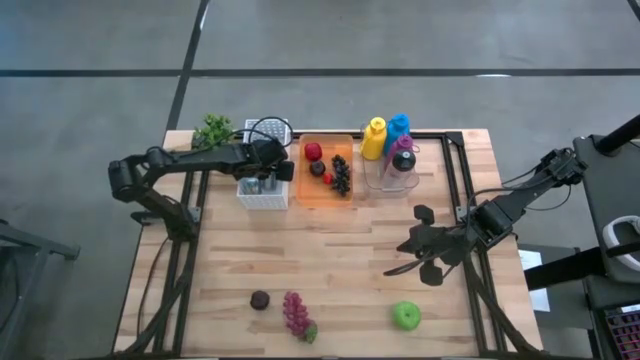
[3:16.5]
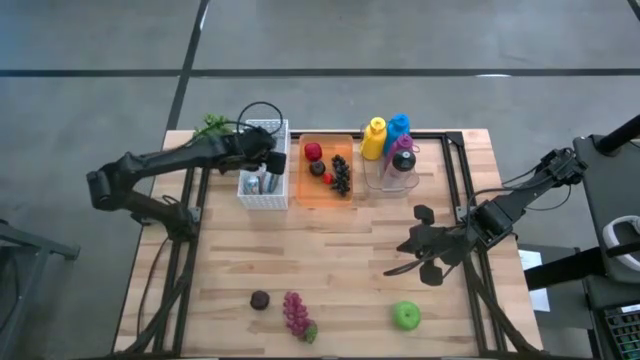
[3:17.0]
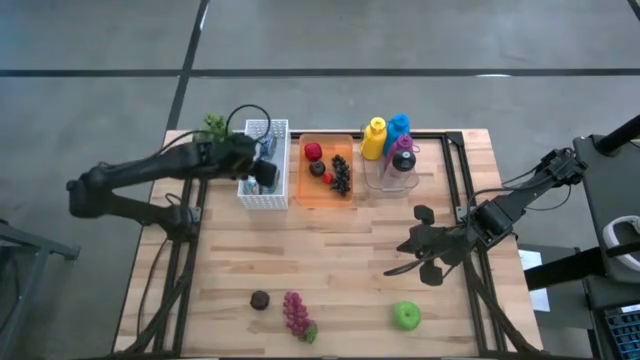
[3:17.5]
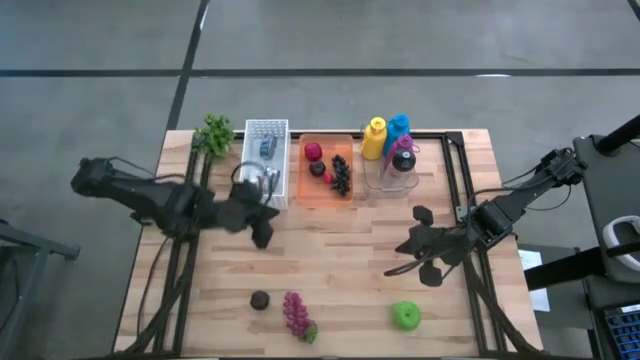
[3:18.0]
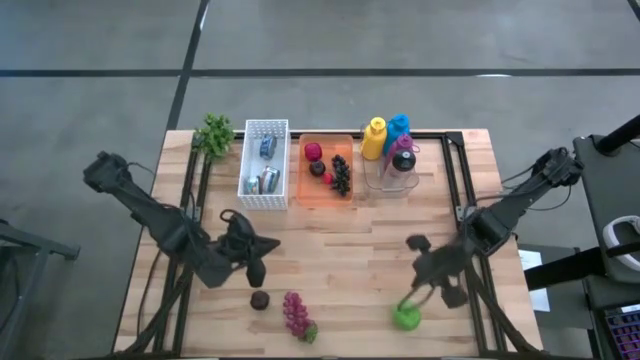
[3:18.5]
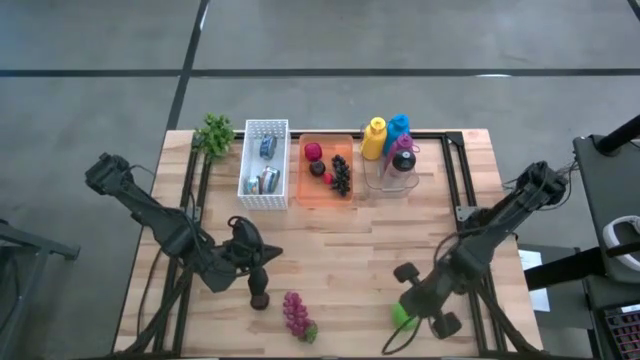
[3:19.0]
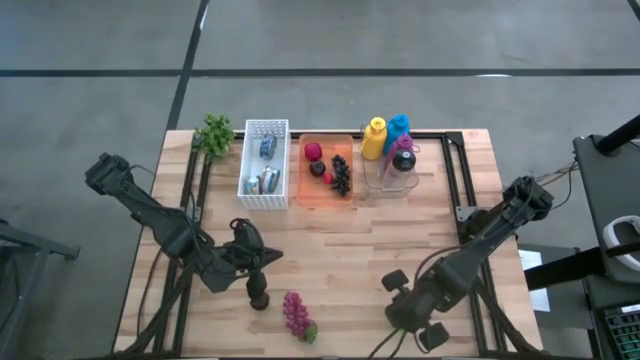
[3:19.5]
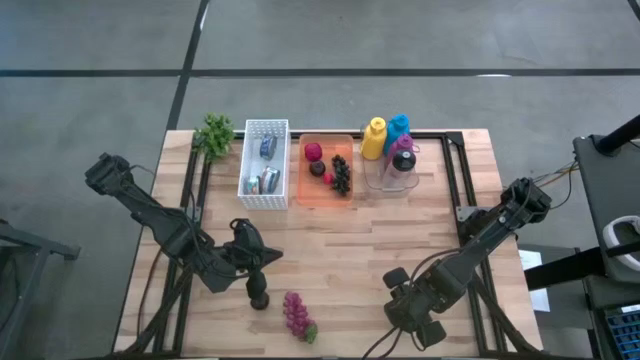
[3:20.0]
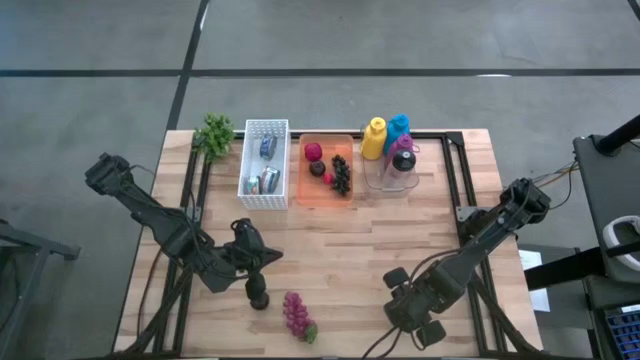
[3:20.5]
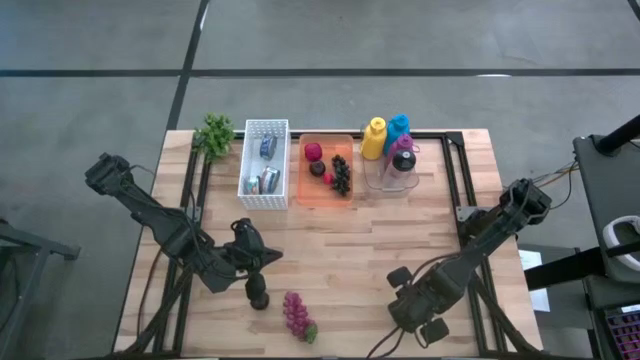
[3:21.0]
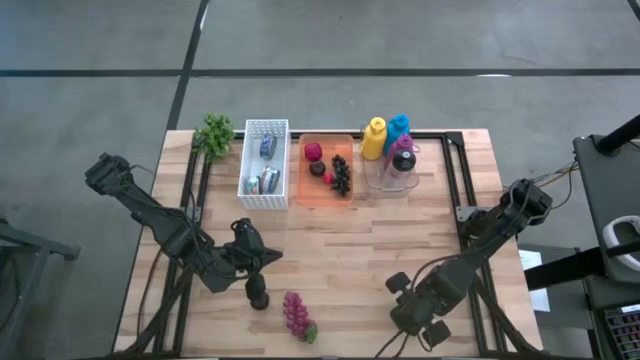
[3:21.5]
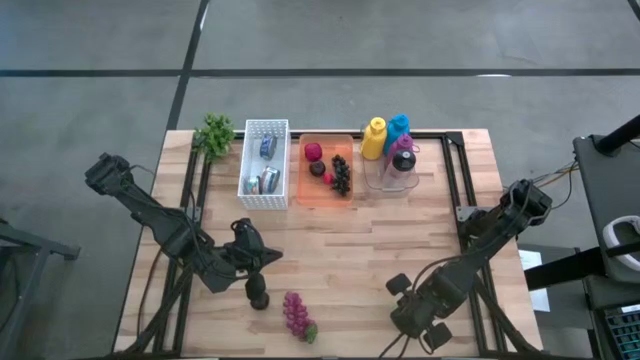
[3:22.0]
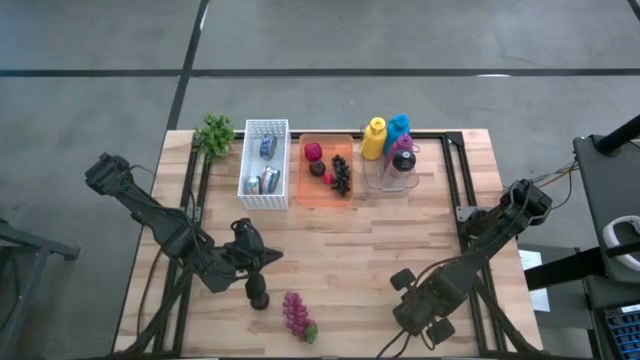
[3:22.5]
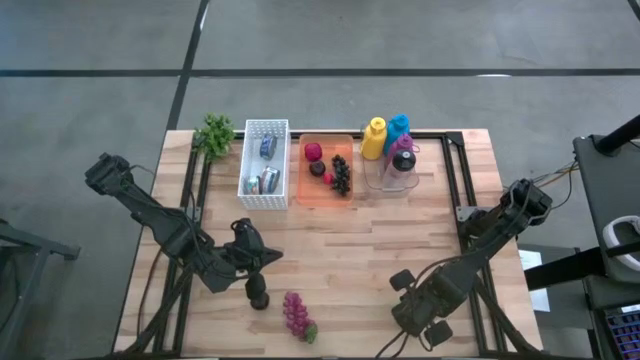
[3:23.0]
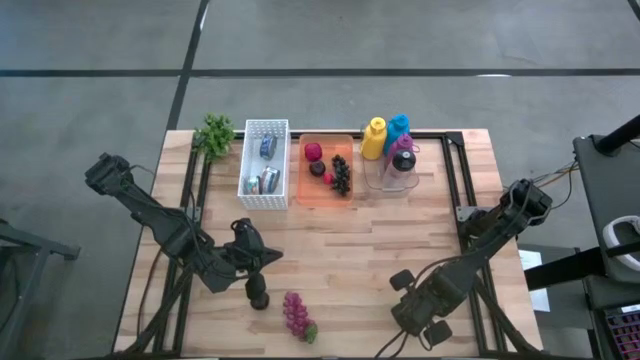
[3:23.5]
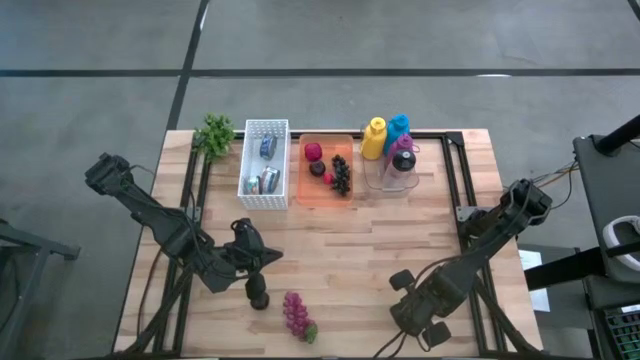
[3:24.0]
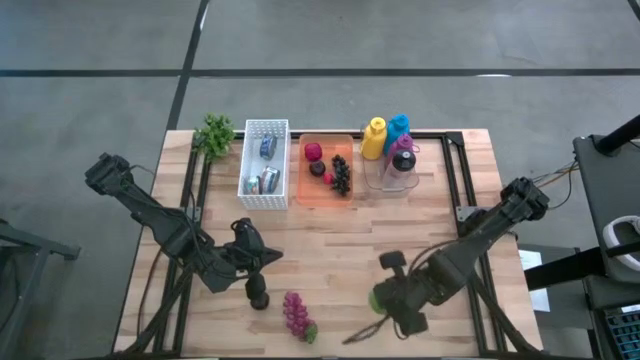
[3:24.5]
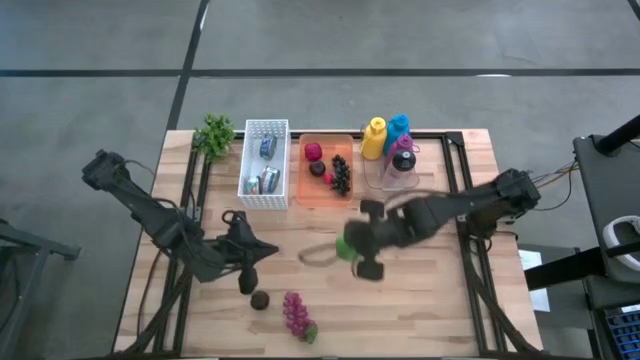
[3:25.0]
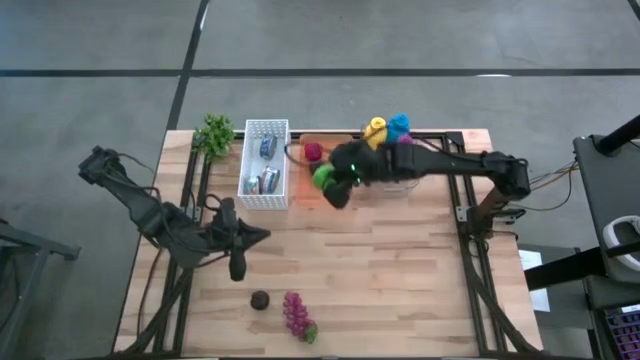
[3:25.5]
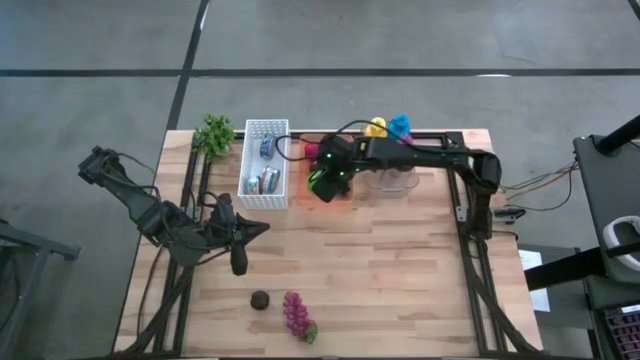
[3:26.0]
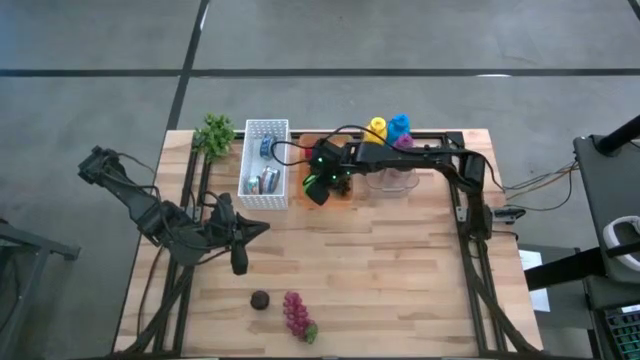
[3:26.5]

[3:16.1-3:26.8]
Task: Pick & Place Food Item
Put the green apple into the orange bin

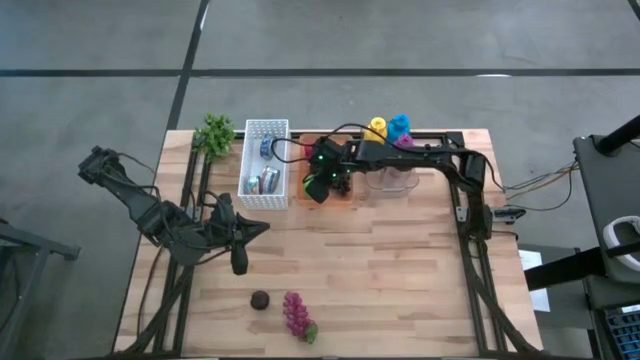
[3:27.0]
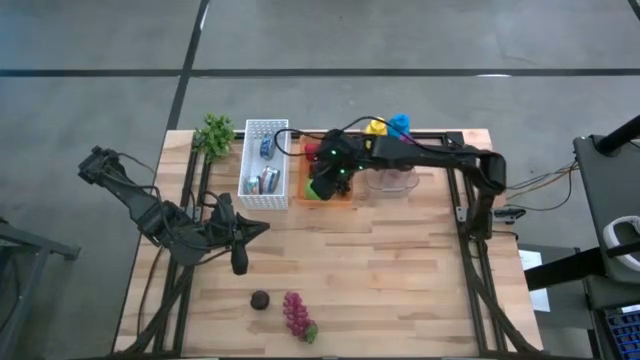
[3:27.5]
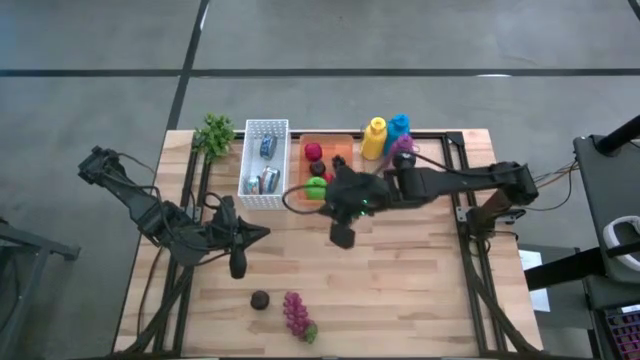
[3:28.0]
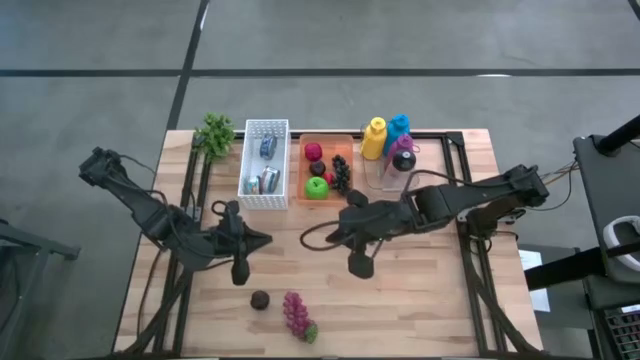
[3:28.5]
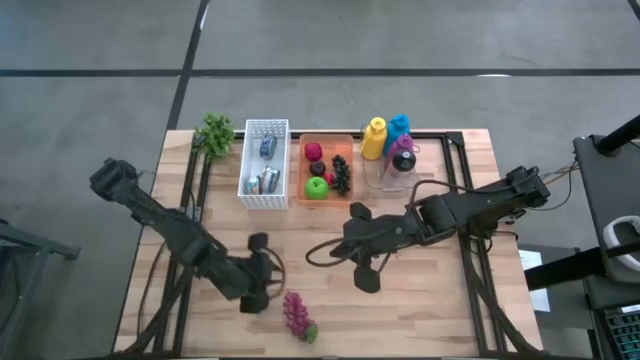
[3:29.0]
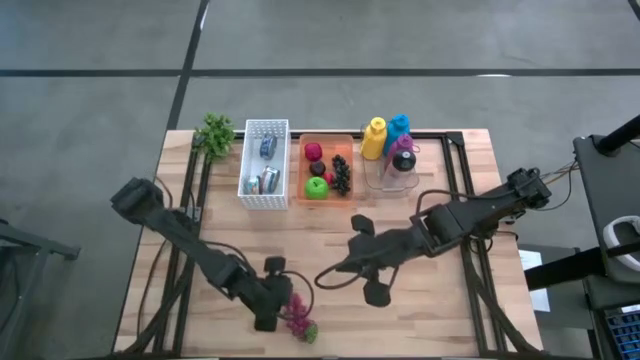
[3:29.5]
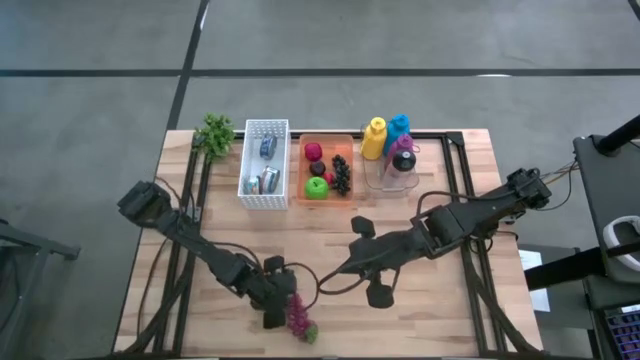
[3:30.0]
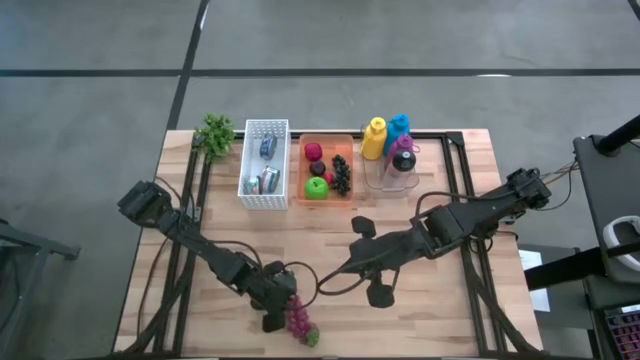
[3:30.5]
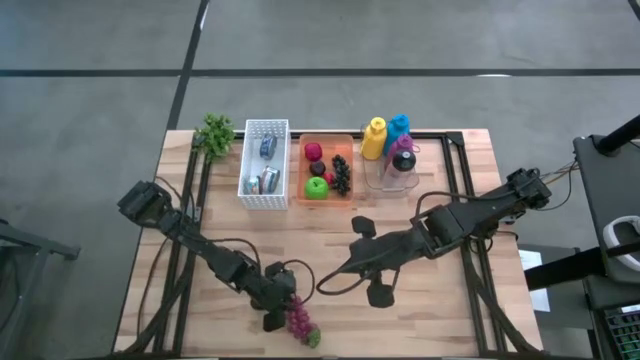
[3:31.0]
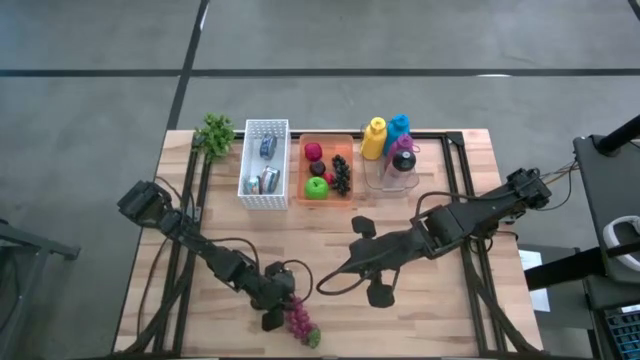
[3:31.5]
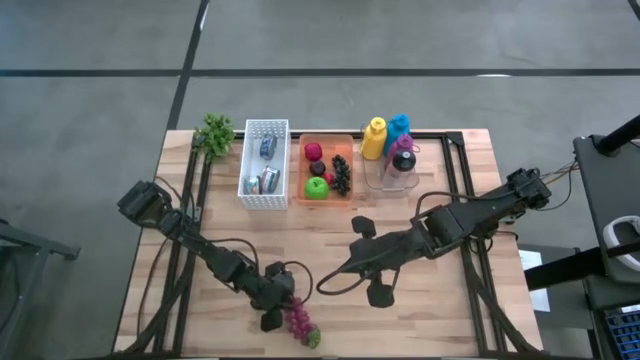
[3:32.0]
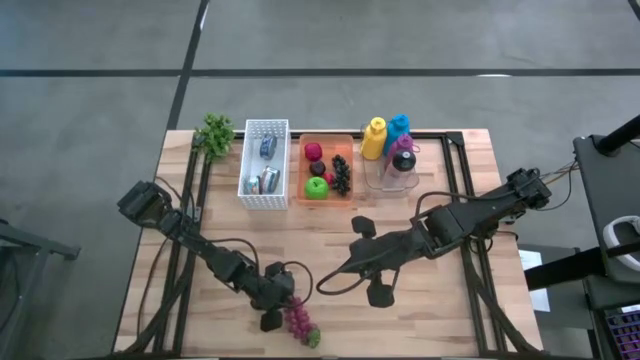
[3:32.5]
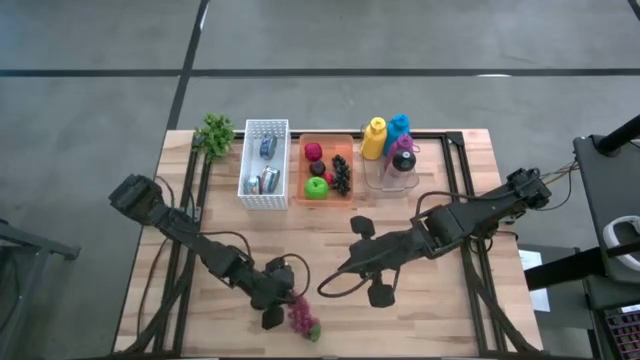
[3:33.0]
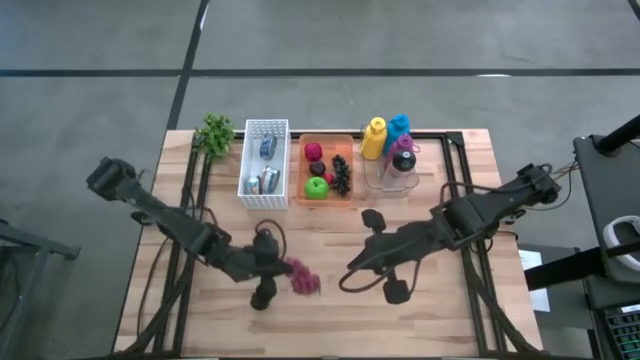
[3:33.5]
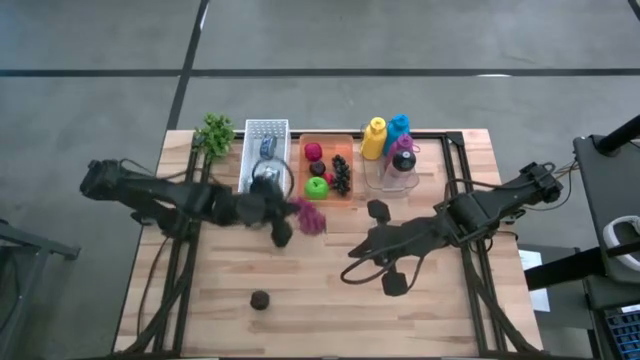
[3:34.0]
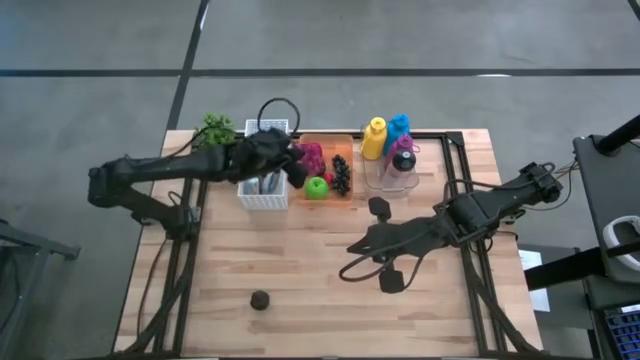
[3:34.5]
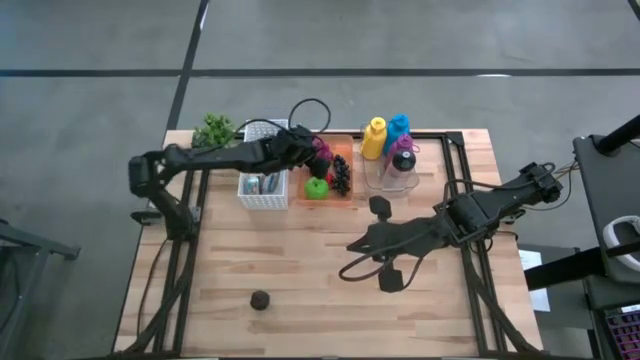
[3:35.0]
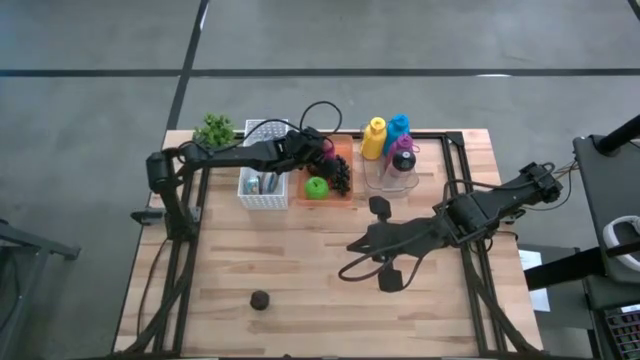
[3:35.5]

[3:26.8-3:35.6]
Put the grapes into the orange bin

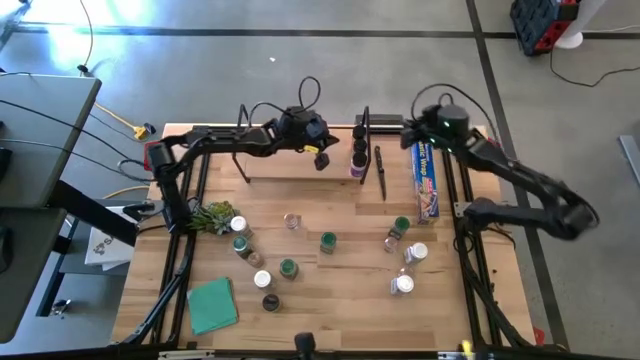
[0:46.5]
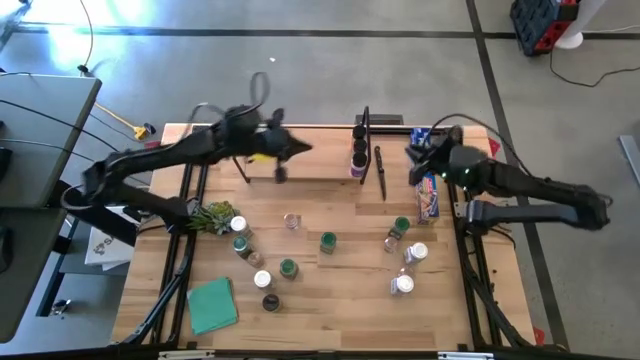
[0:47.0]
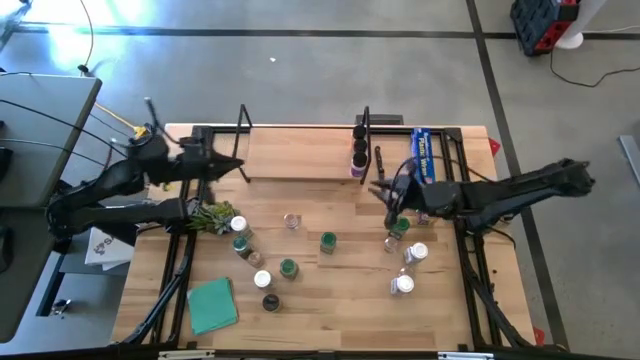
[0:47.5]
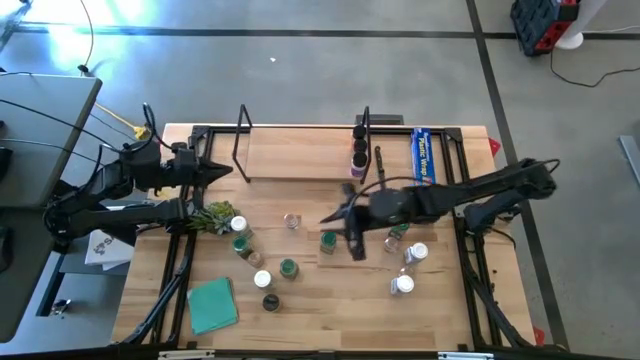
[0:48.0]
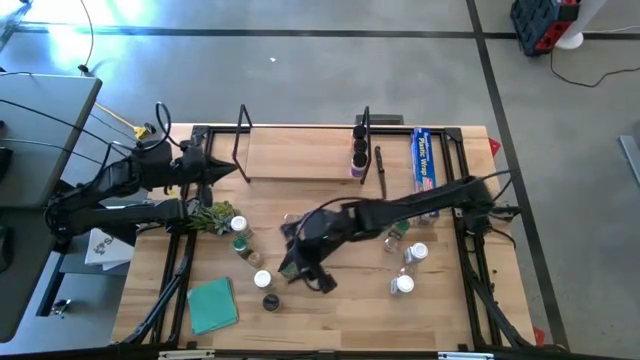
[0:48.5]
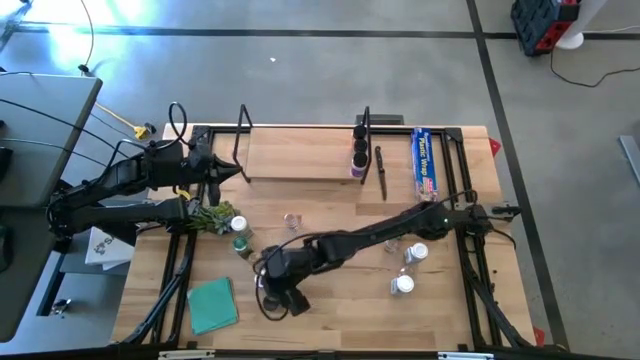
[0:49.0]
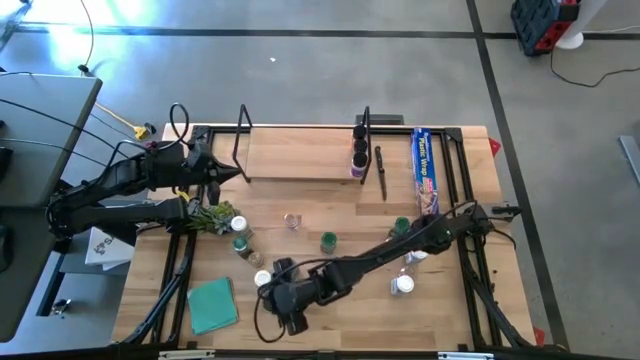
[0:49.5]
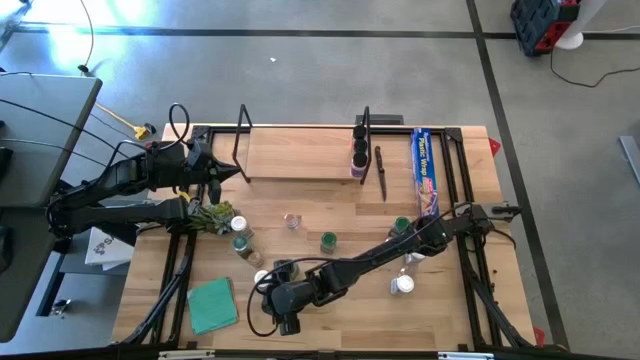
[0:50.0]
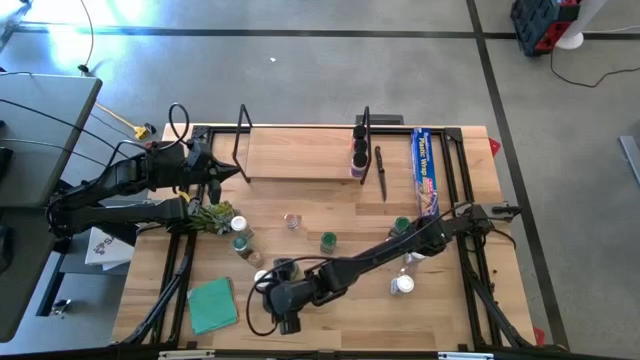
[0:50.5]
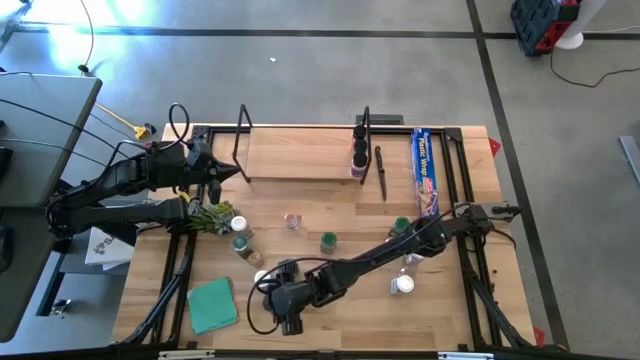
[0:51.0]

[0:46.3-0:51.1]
Task: Shelf spices
Put the black seasoning bottle on the shelf aligned with the other black seasoning bottles
